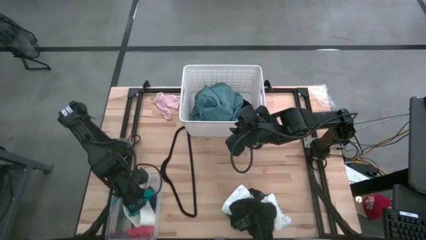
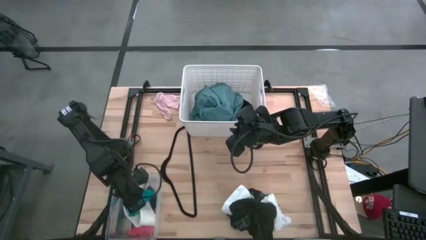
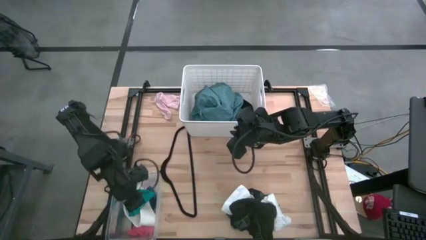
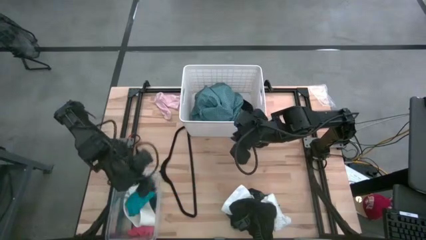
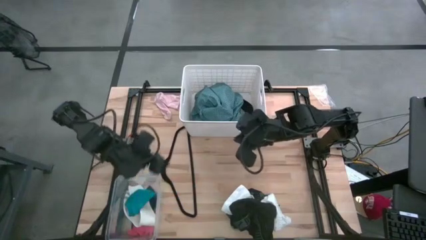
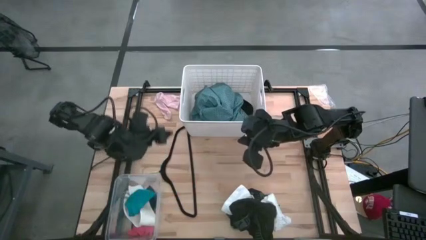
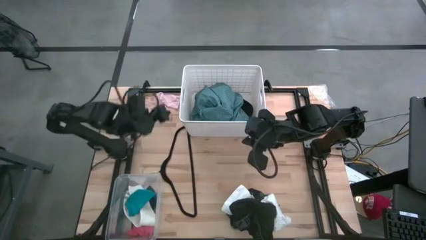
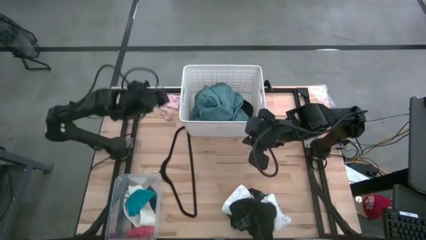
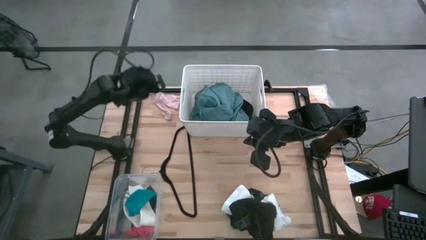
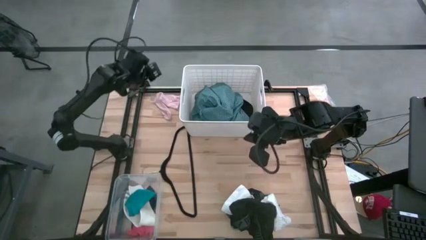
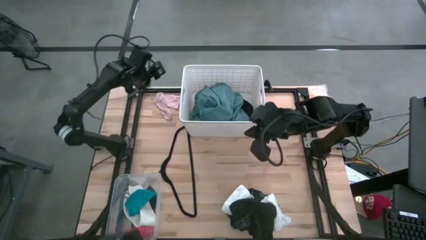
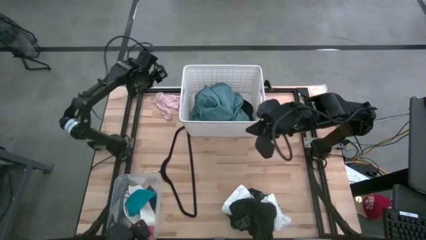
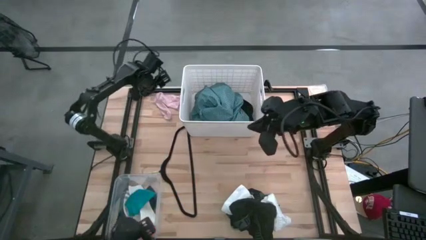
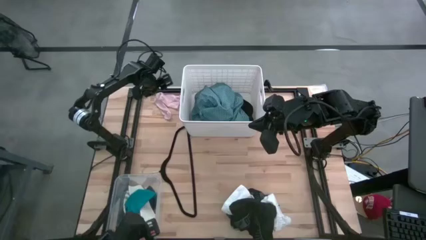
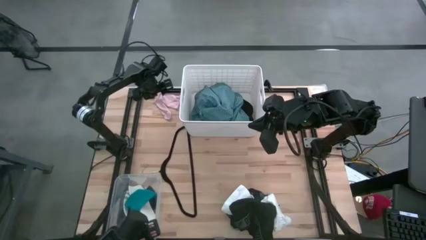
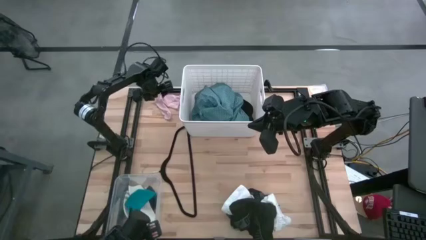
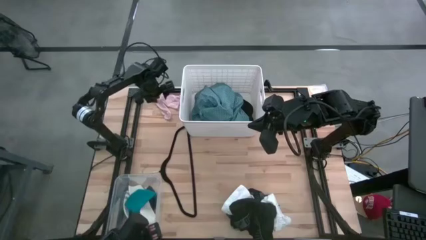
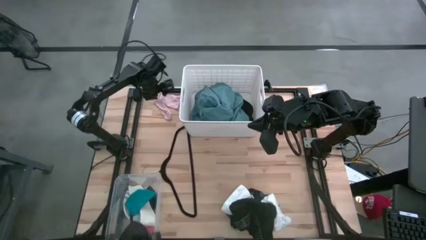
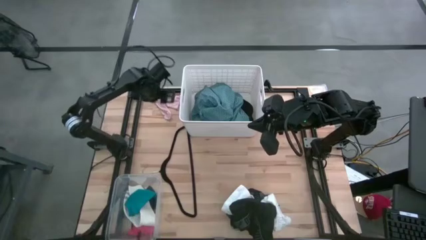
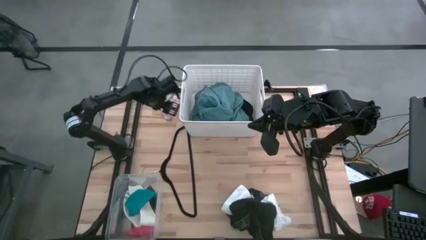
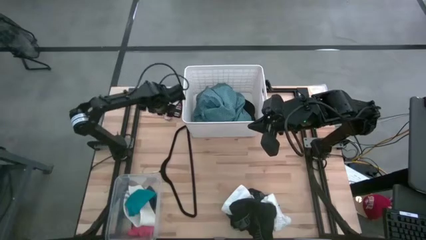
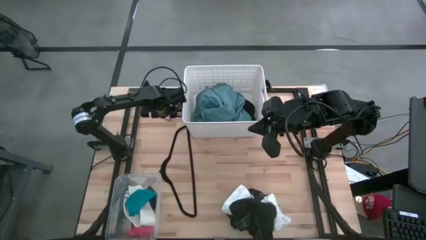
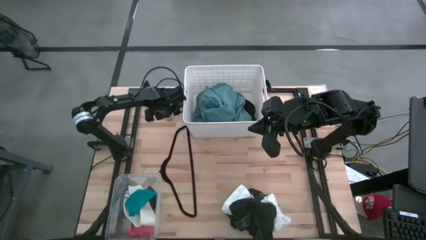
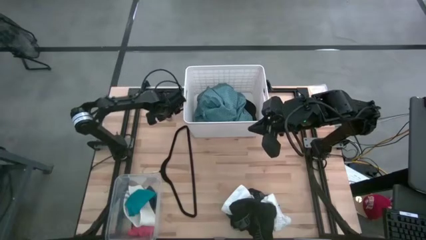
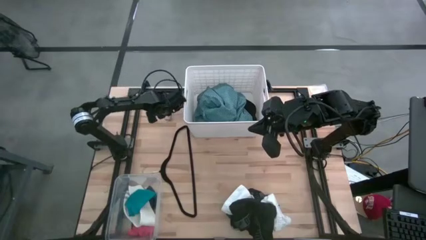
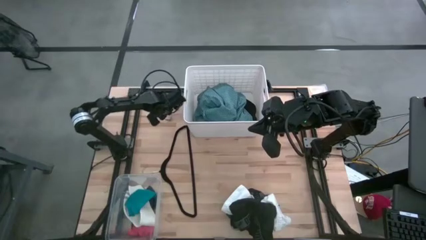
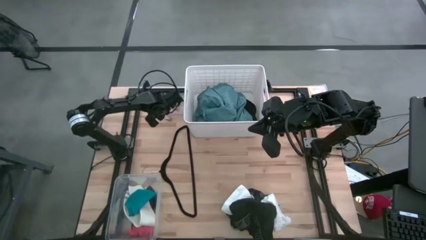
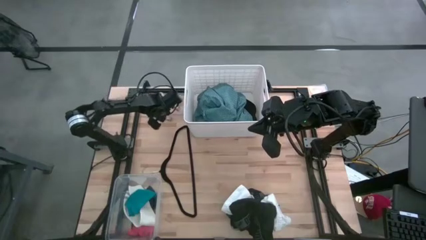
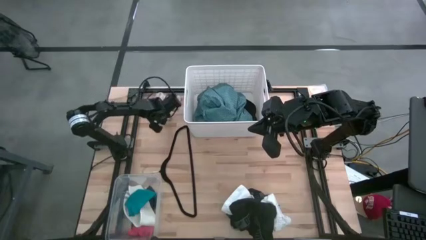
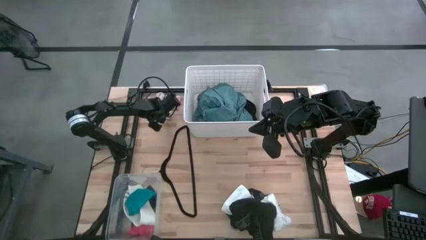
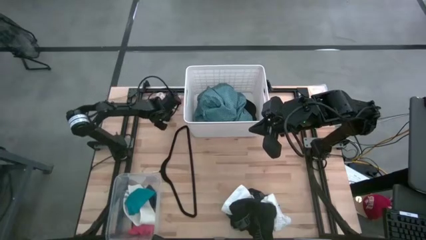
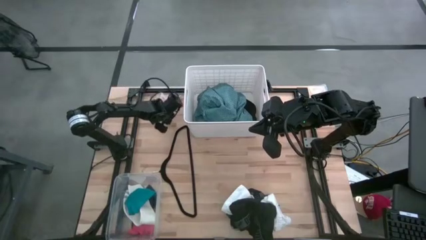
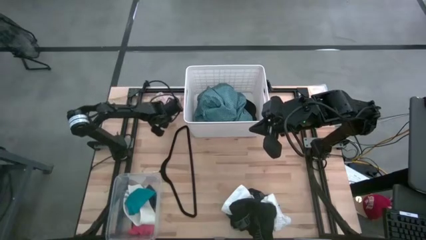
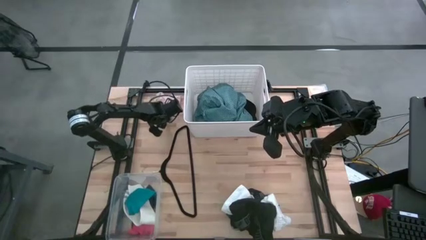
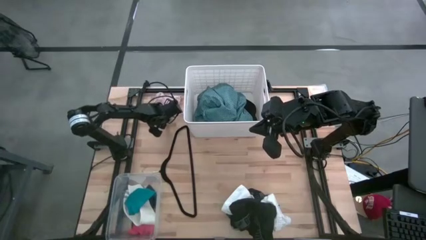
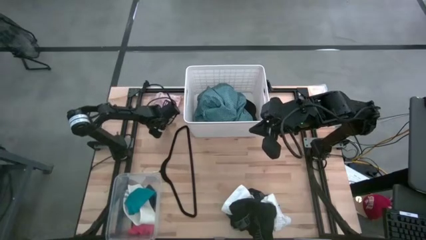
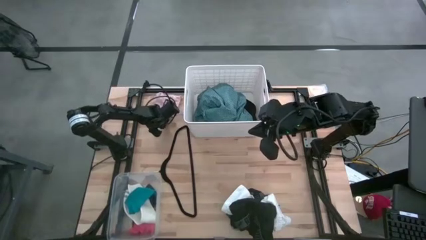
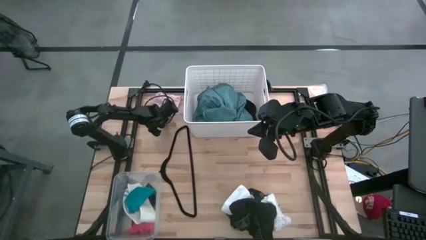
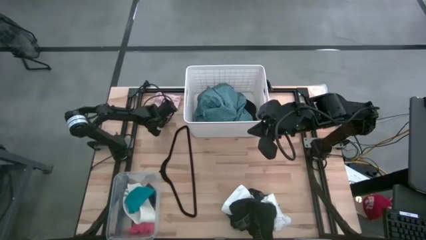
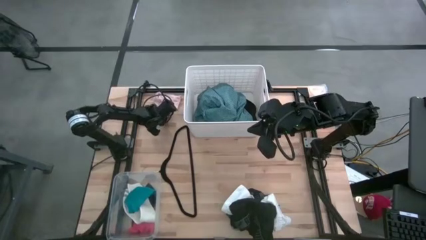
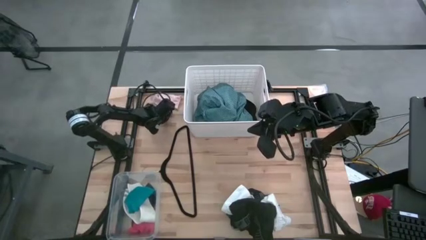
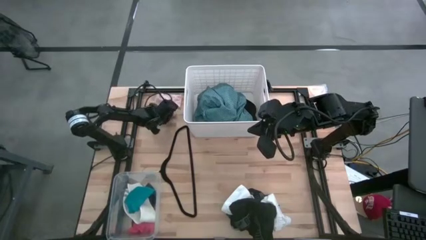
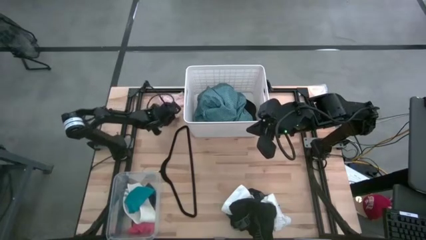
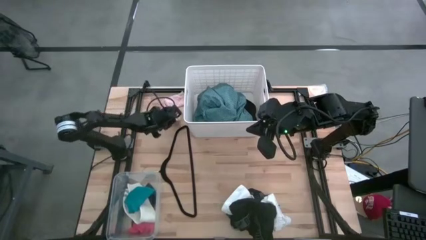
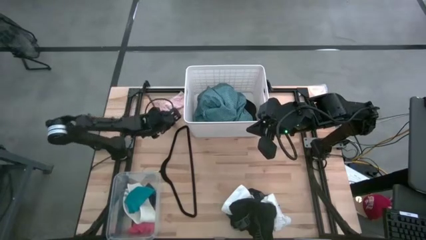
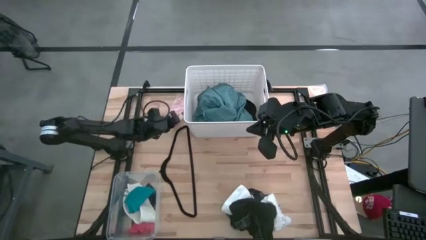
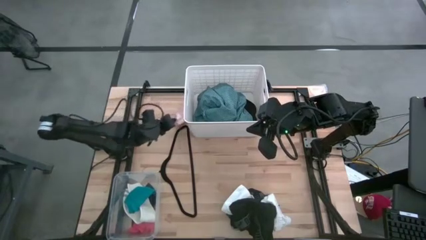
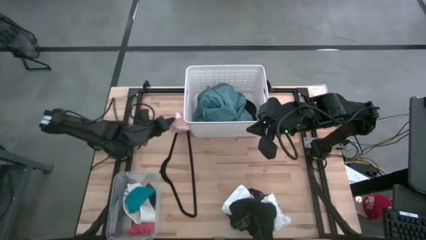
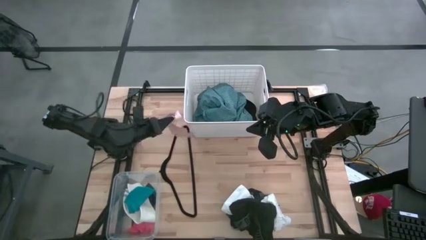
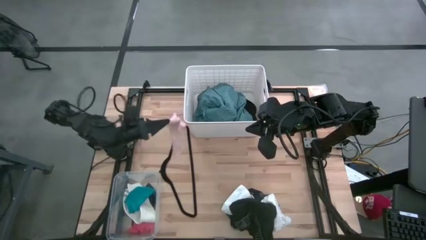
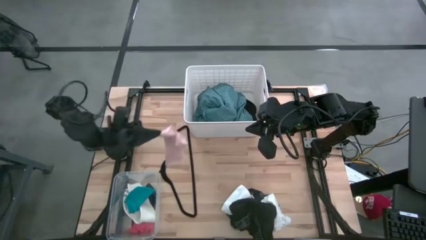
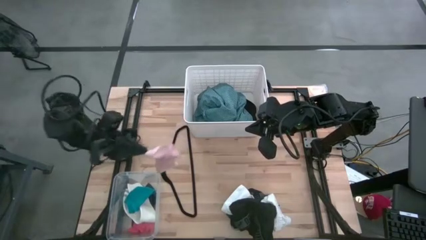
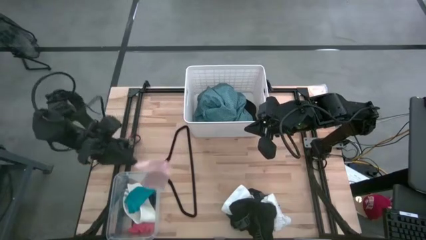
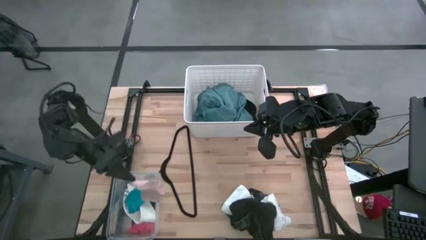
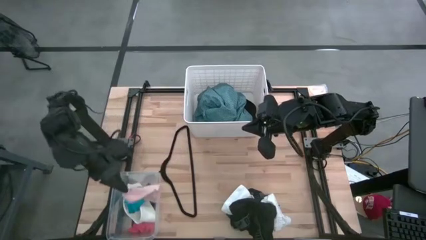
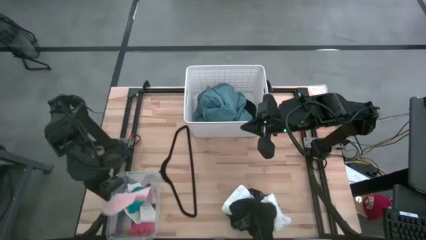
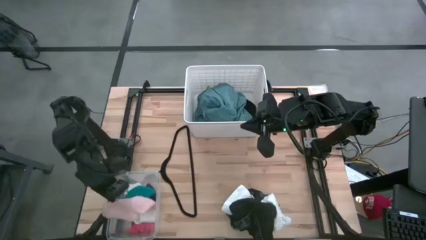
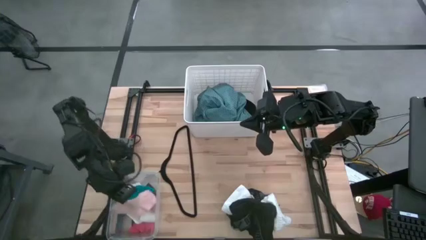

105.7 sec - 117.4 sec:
Task: Pick & Place Cloths
Put the pink sock into the left transparent bin

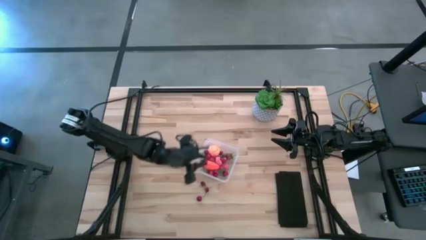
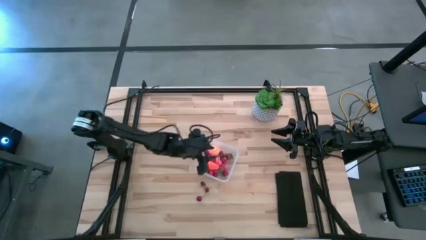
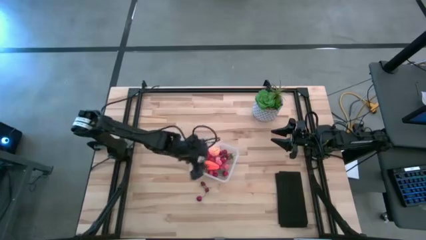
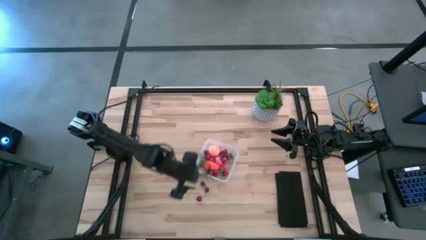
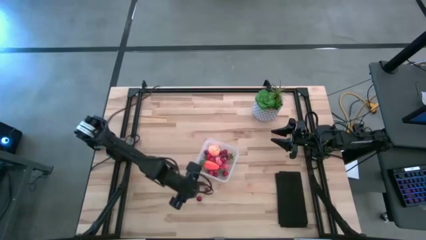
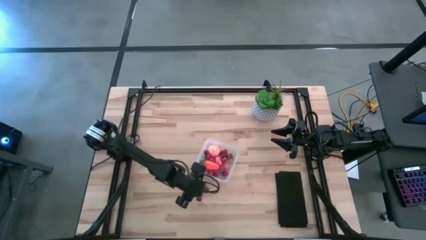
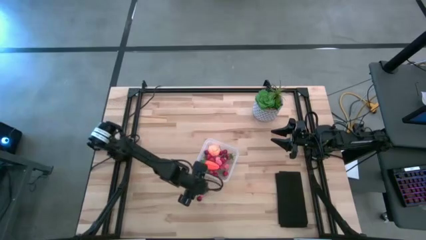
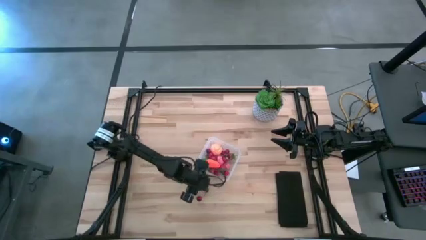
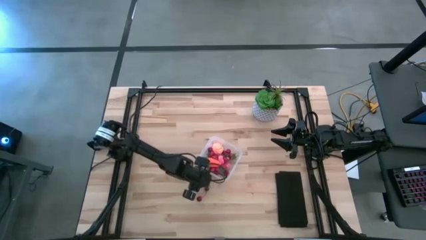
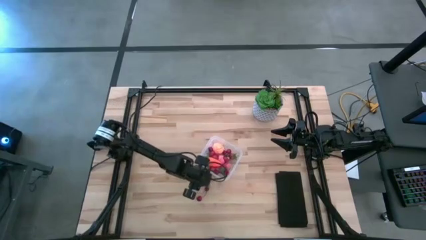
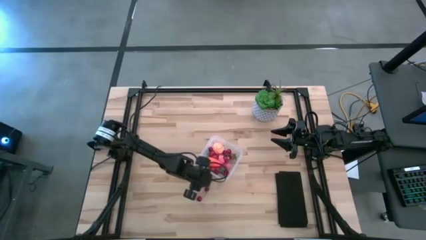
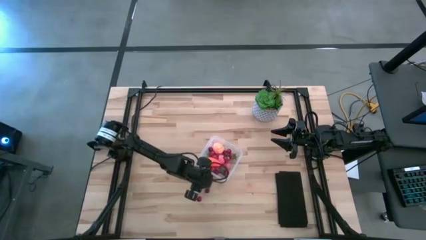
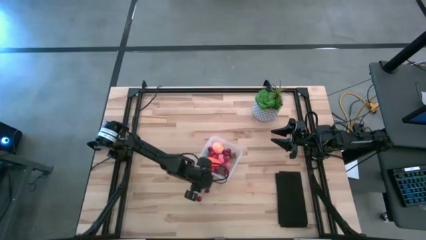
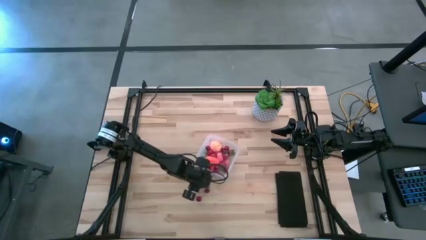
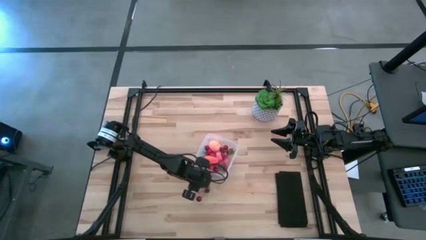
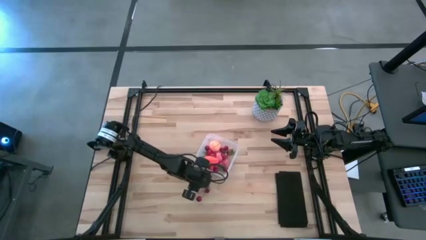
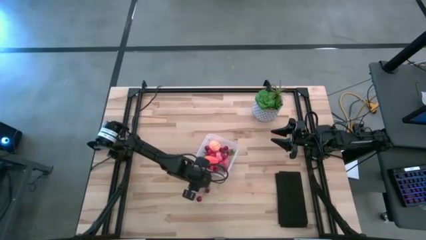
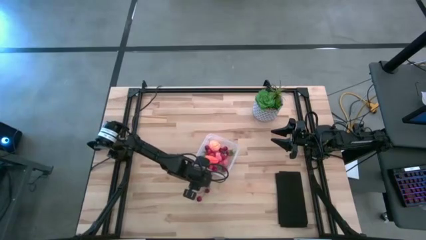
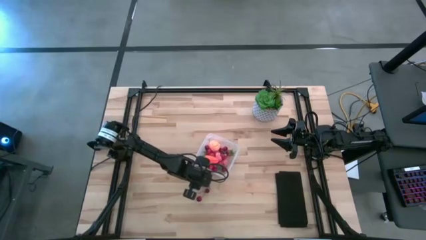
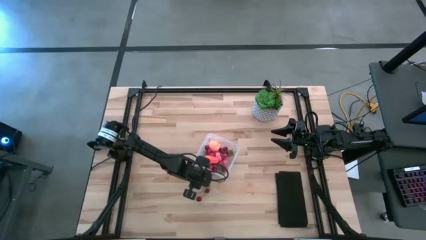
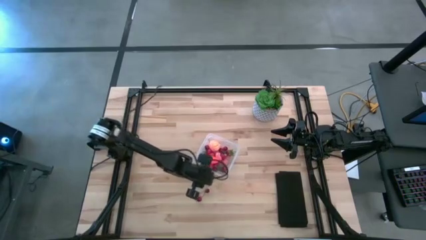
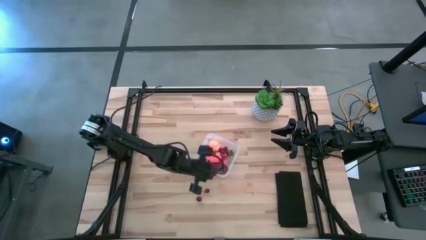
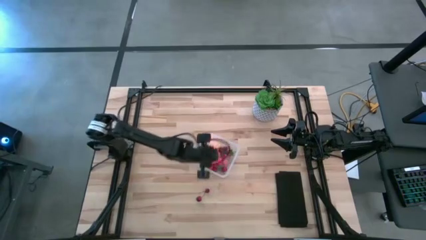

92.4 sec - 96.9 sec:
Task: Pick and placing Produce into tupperware
Put the red cherry into the transparent container

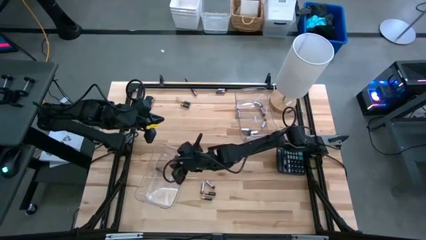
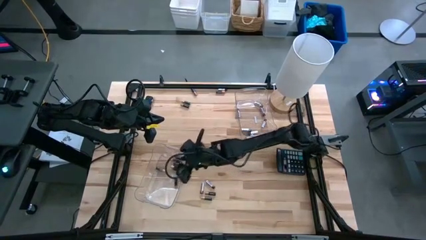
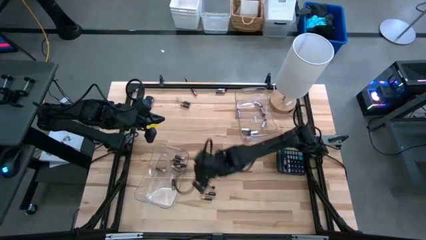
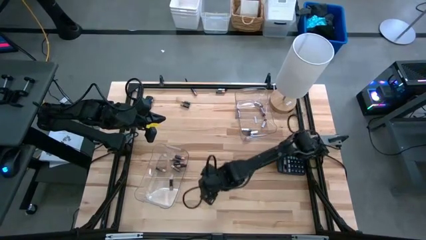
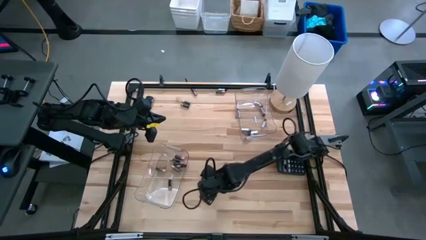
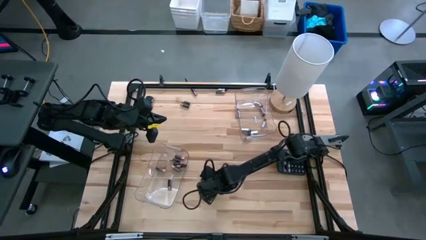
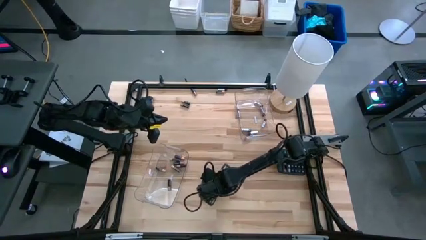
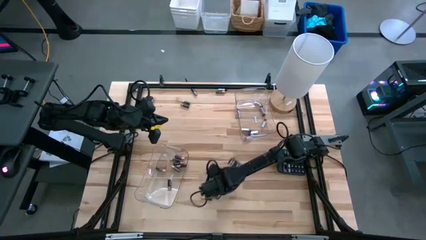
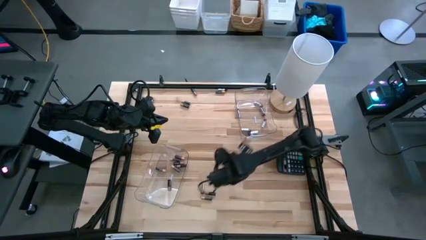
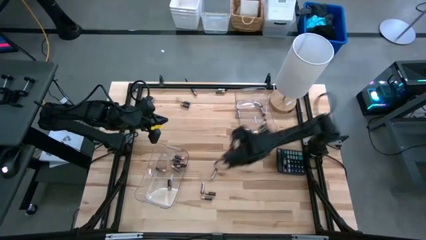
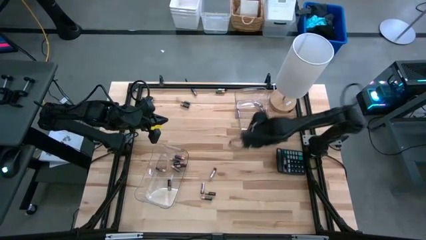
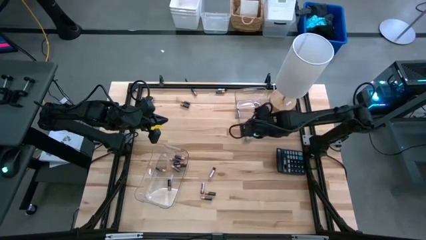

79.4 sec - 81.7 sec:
Task: Sort batteries
Put the silver battery into the right transparent bin
